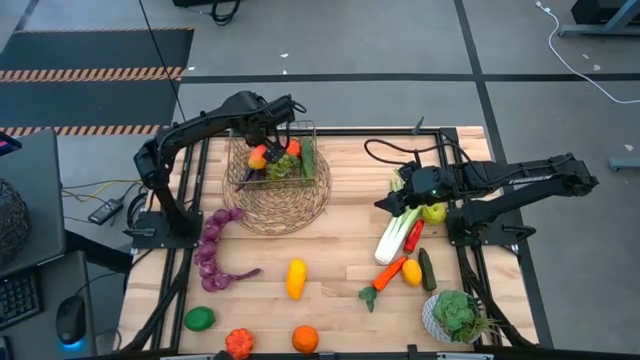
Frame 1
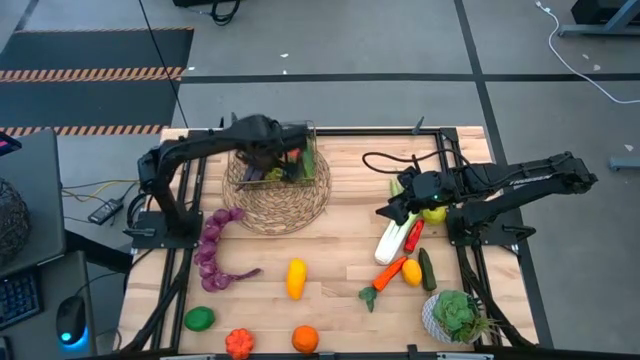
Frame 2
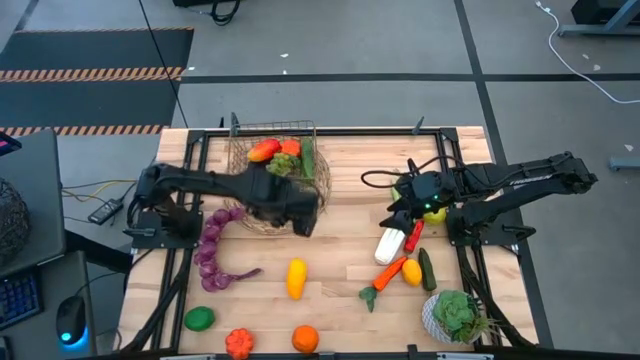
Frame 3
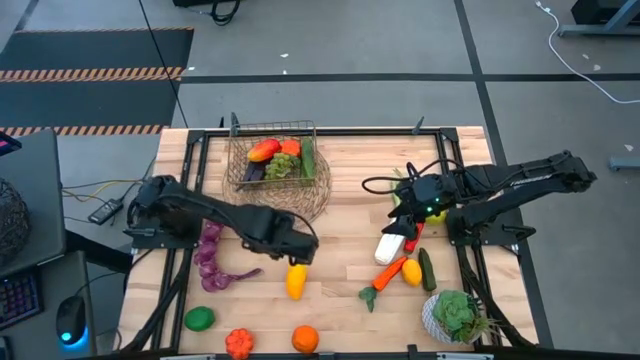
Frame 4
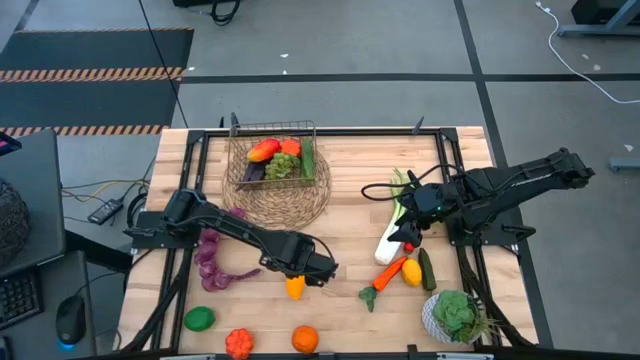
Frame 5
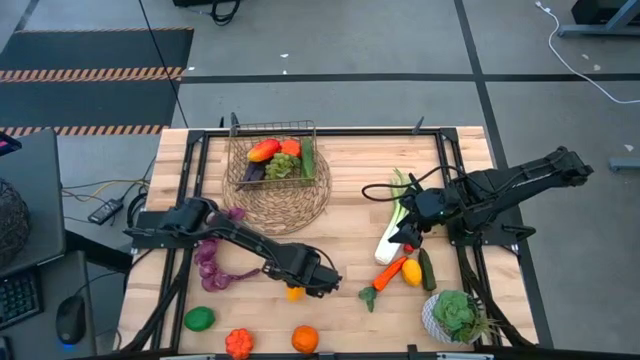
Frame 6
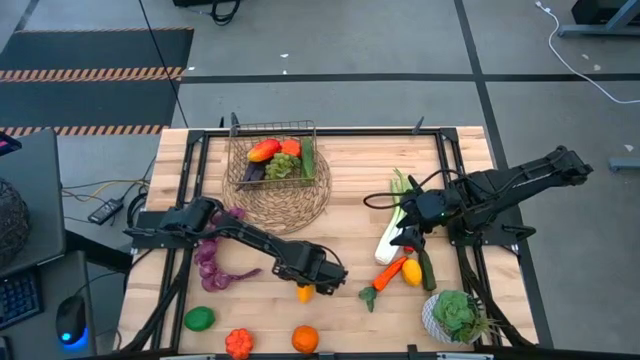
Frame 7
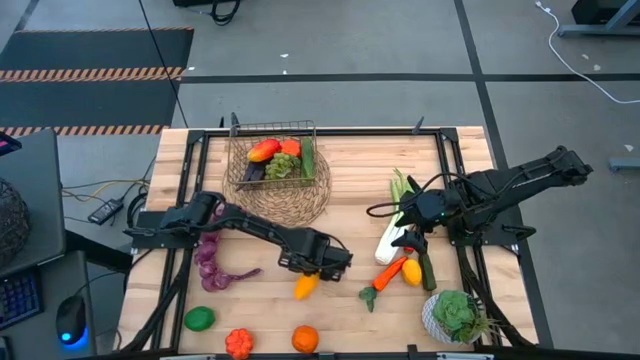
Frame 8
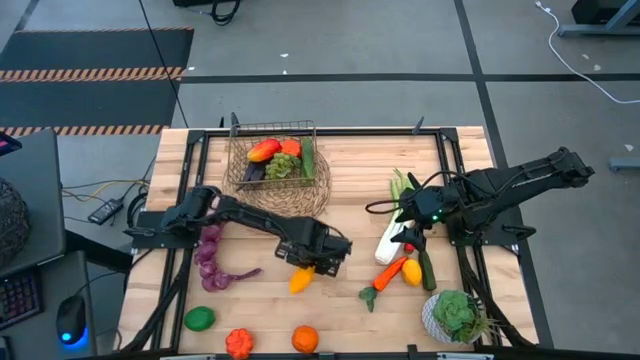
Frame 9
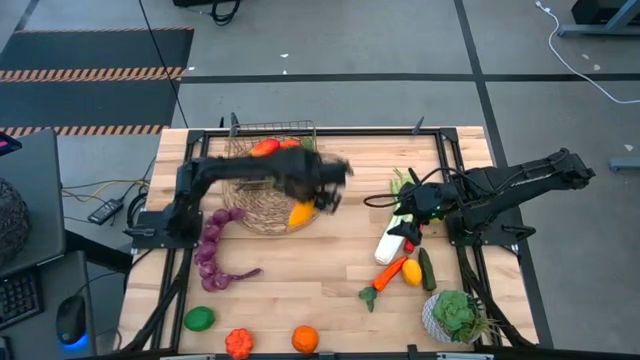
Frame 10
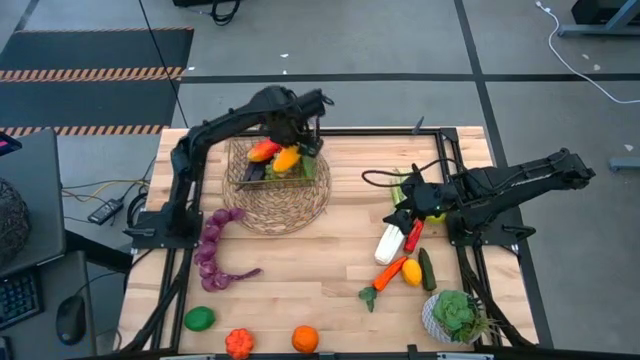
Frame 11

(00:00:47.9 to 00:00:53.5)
Task: Build produce basket
Put the yellow mango into the wire basket

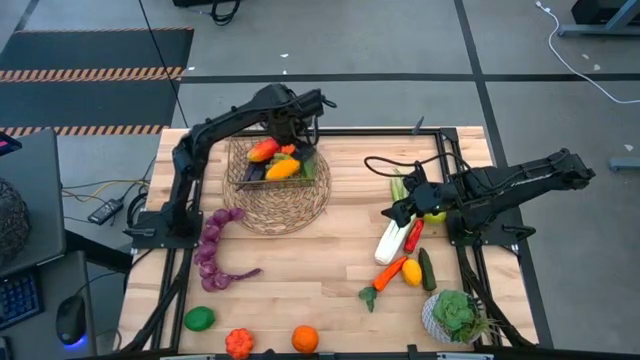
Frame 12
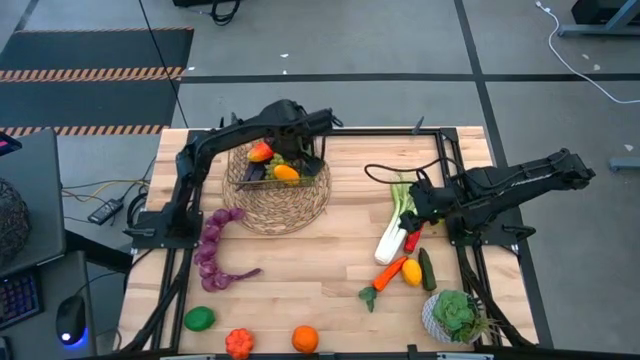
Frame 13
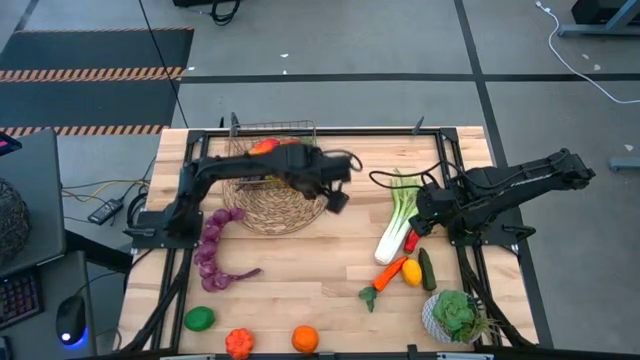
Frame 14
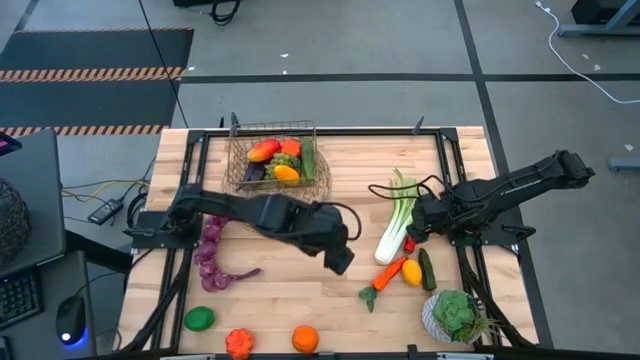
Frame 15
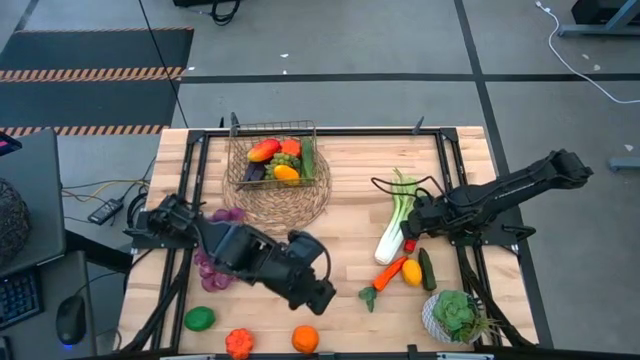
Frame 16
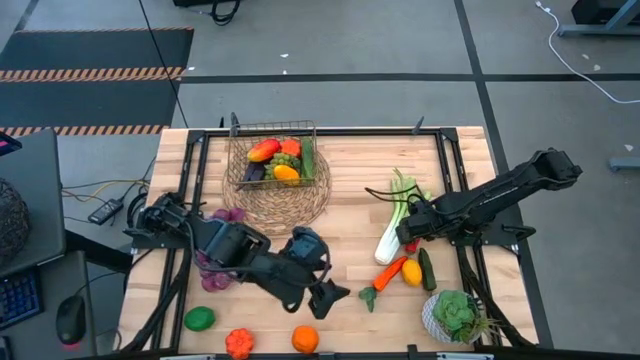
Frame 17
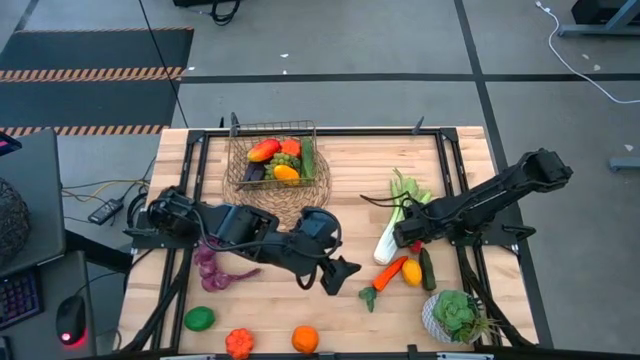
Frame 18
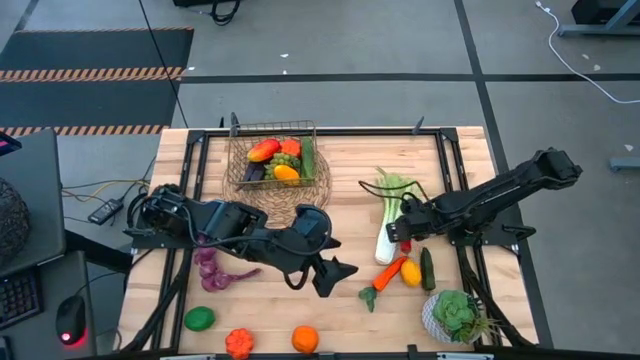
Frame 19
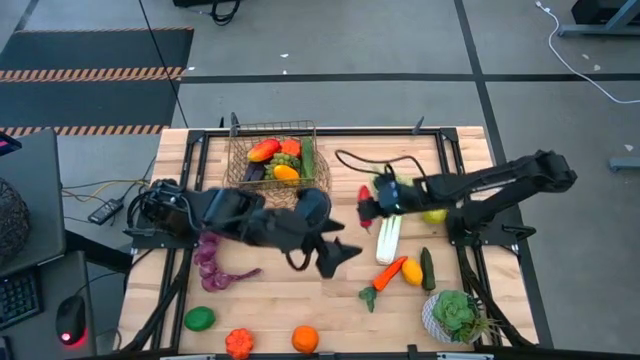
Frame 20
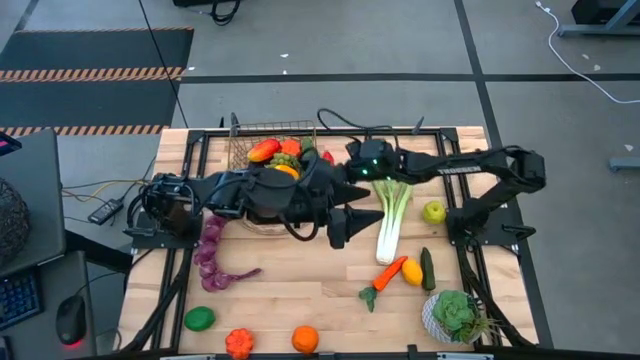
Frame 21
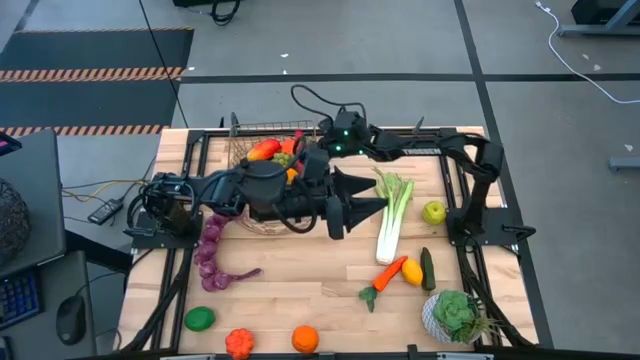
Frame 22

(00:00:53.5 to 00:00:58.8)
Put the red chili pepper into the wire basket

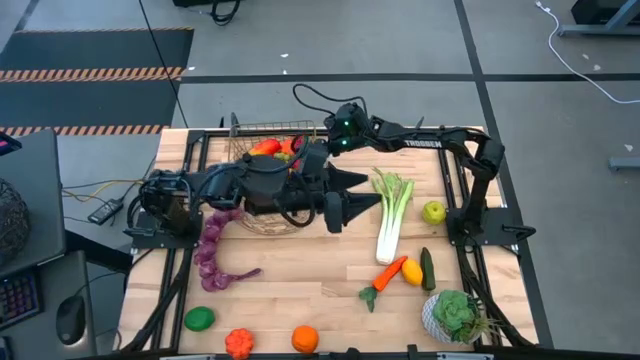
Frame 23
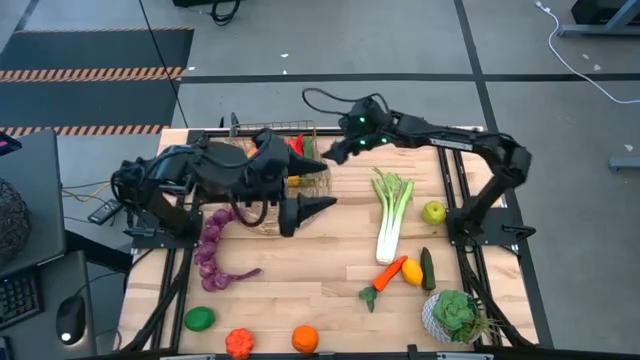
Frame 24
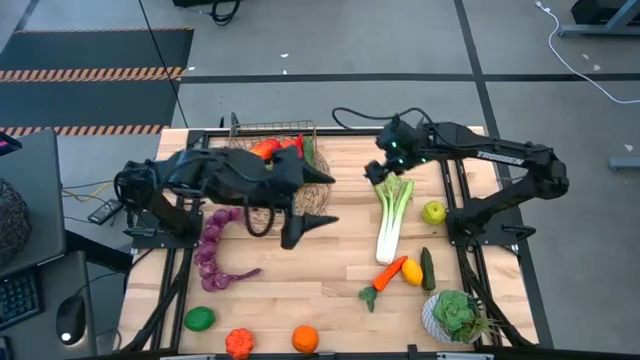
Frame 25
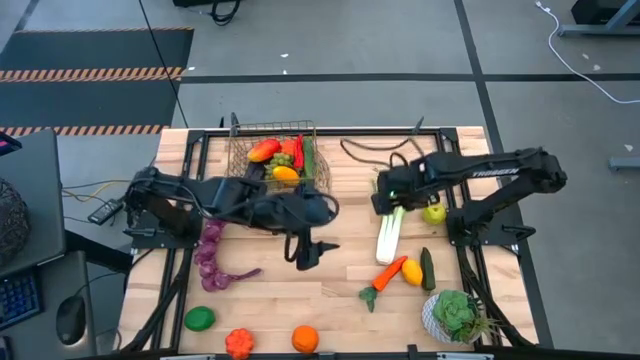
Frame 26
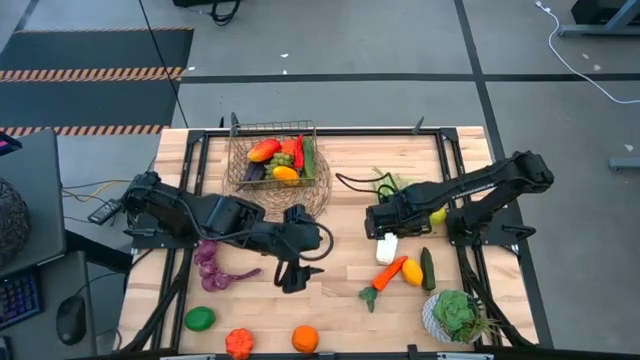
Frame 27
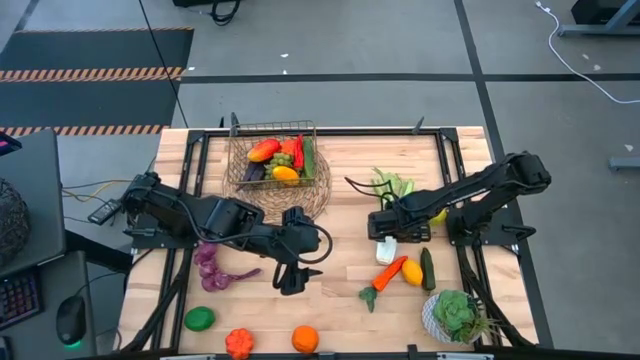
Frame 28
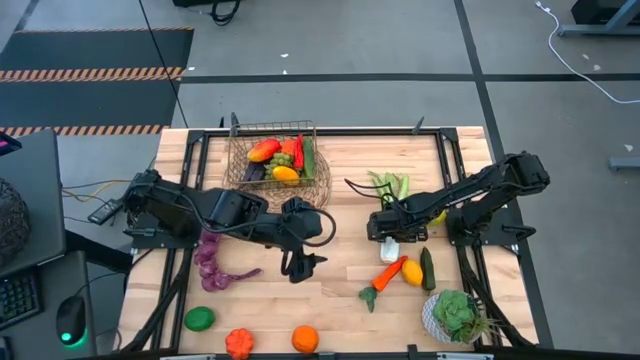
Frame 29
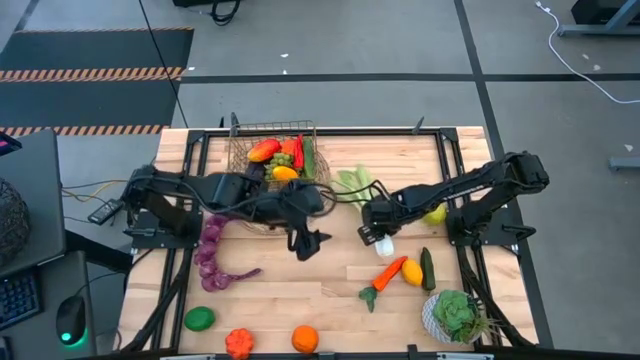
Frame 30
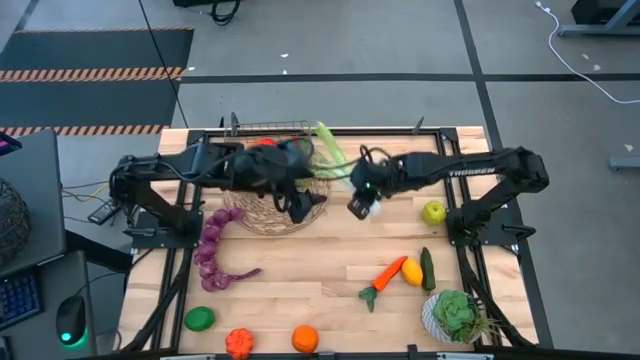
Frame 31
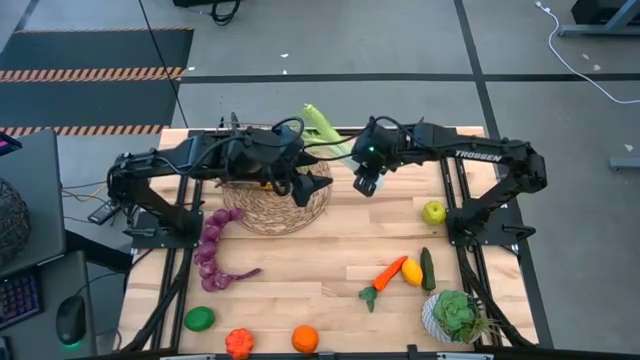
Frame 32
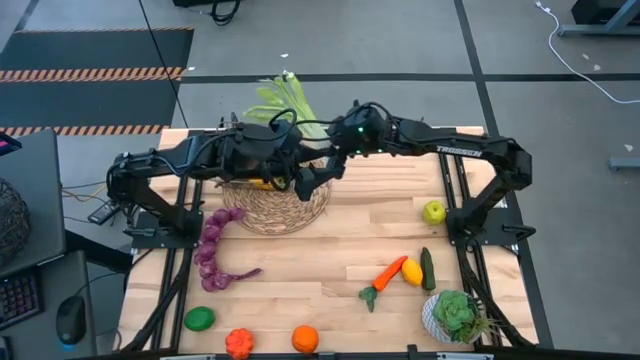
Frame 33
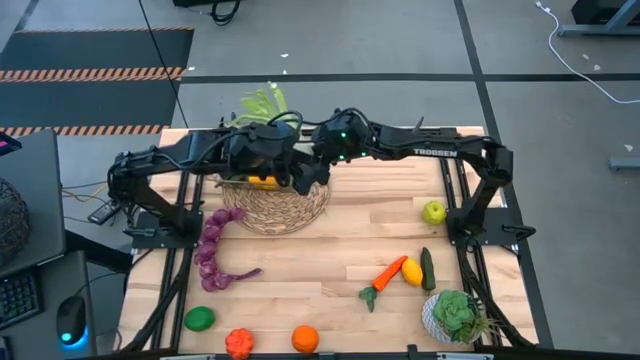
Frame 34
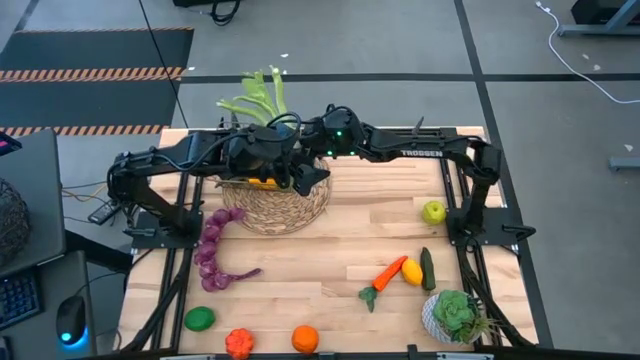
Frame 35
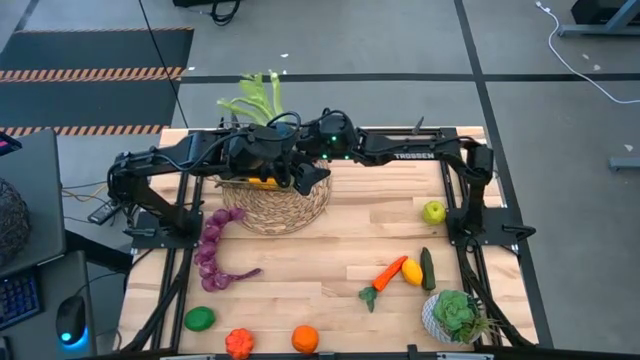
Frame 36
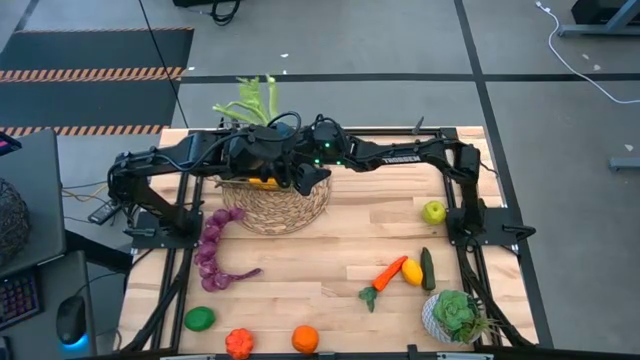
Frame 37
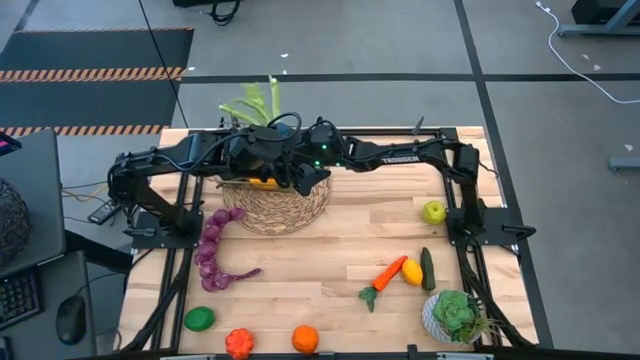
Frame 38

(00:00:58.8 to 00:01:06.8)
Put the green celery into the wire basket

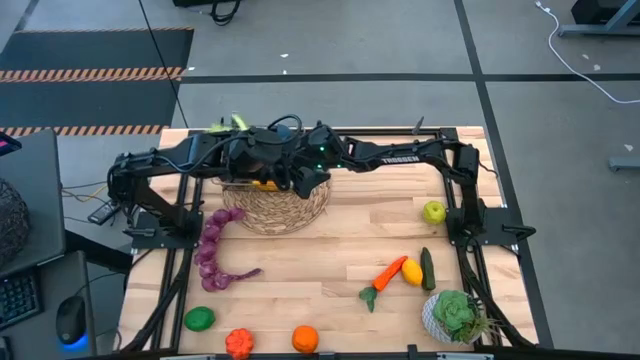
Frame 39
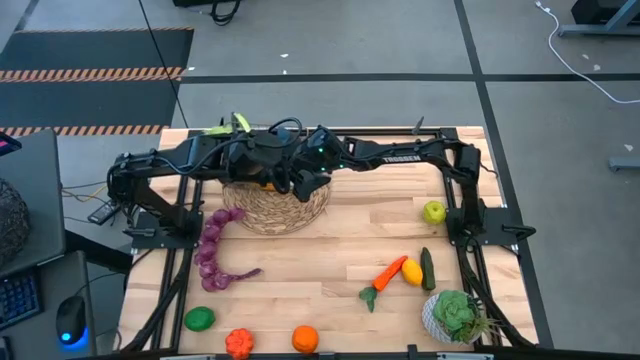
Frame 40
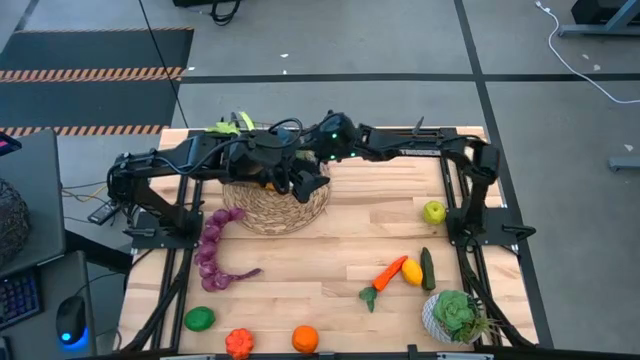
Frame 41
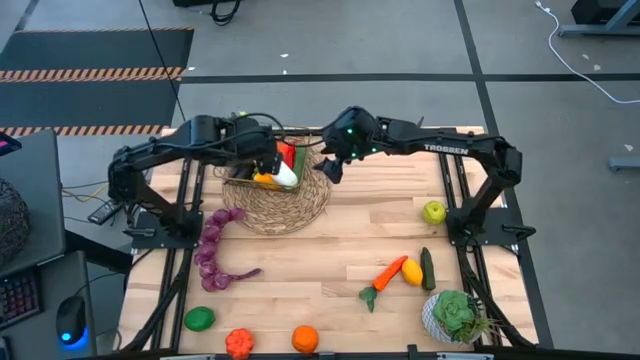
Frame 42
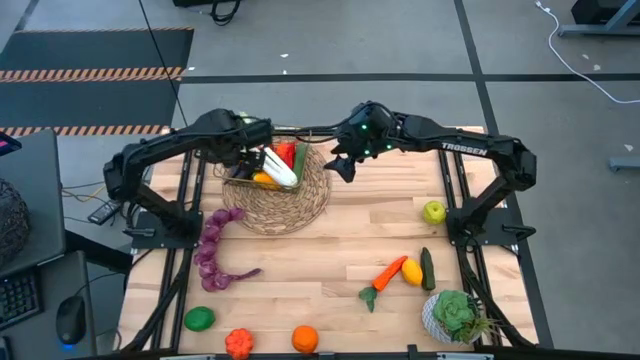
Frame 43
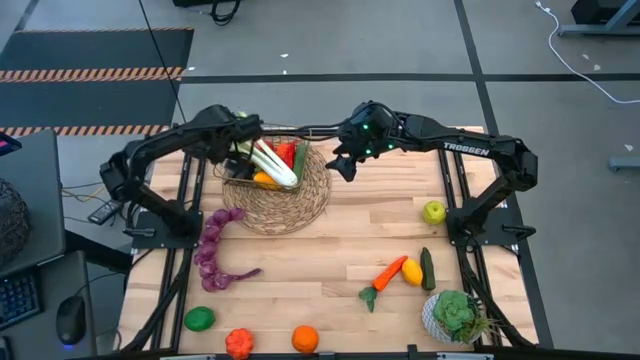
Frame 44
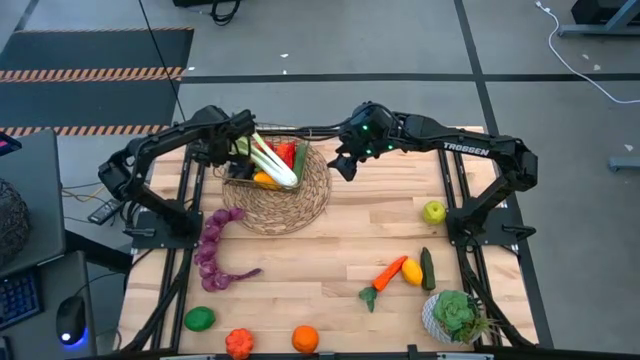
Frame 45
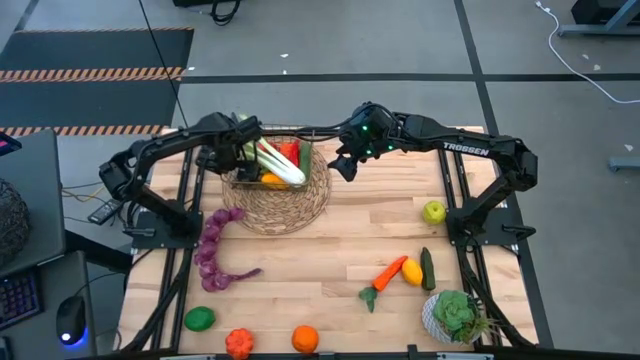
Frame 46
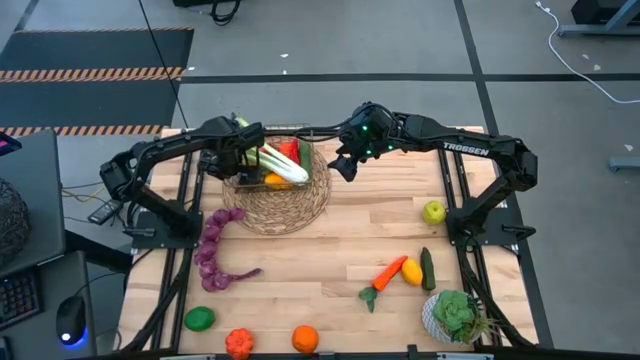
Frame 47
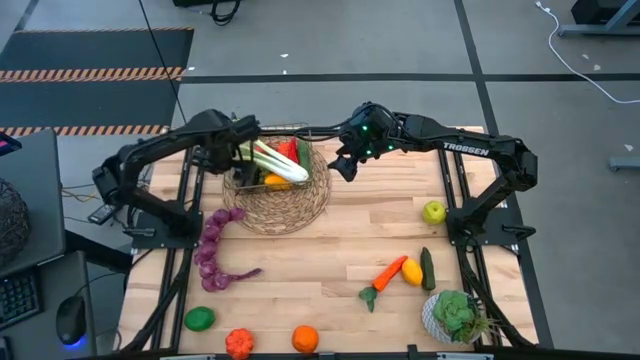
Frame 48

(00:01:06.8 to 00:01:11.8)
Adjust the wire basket
